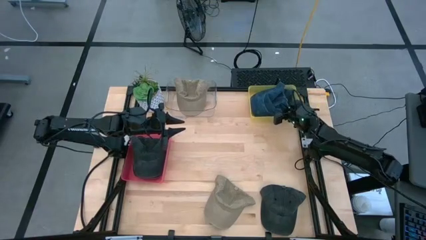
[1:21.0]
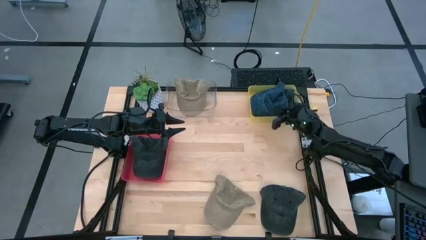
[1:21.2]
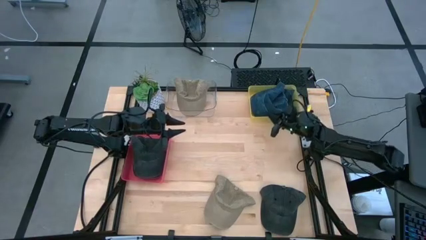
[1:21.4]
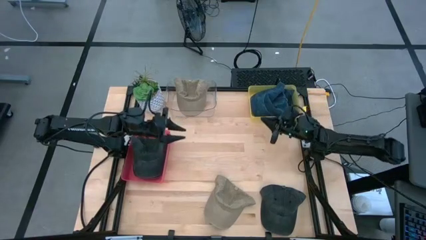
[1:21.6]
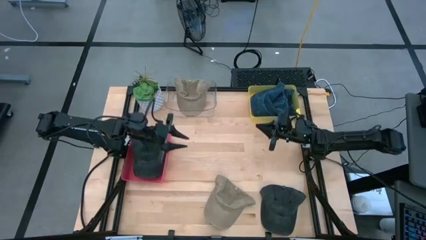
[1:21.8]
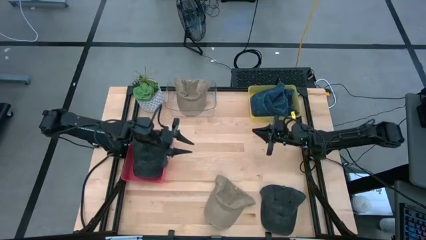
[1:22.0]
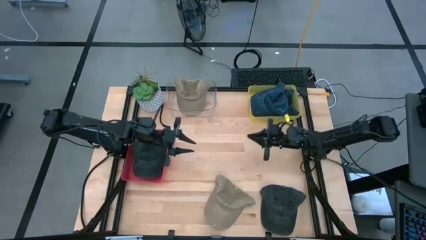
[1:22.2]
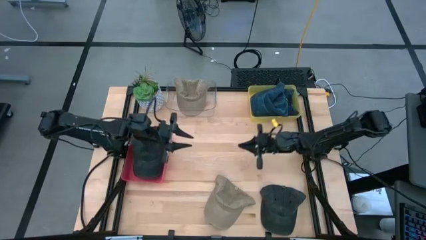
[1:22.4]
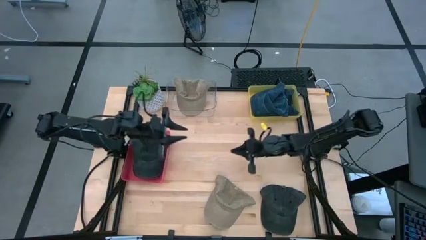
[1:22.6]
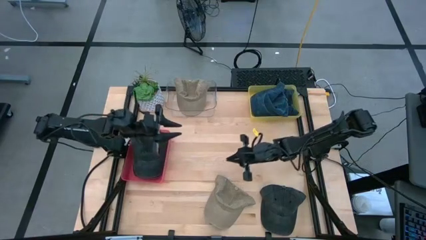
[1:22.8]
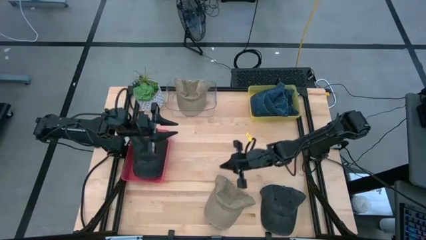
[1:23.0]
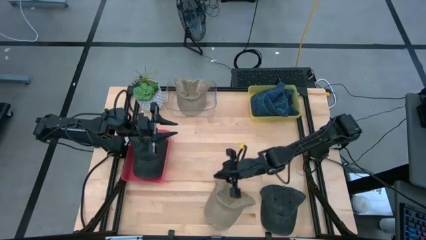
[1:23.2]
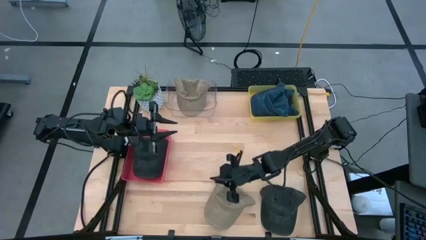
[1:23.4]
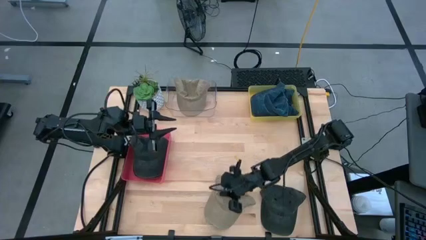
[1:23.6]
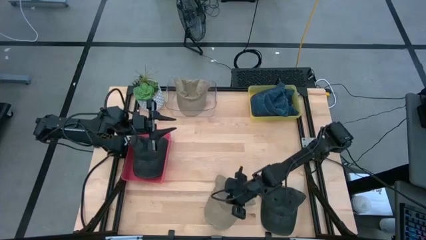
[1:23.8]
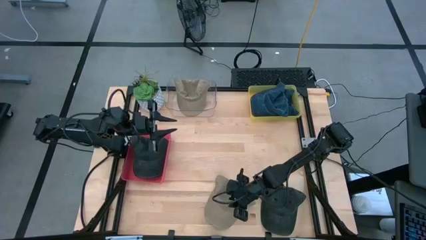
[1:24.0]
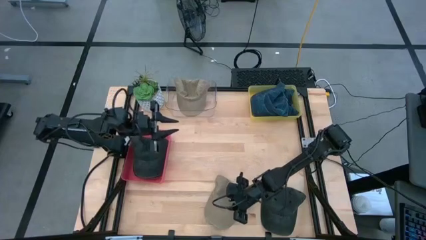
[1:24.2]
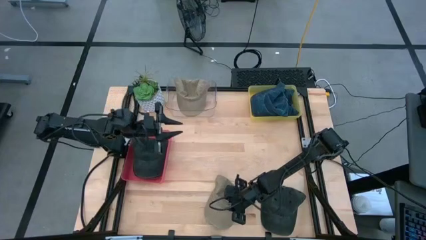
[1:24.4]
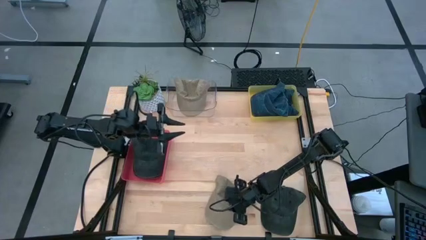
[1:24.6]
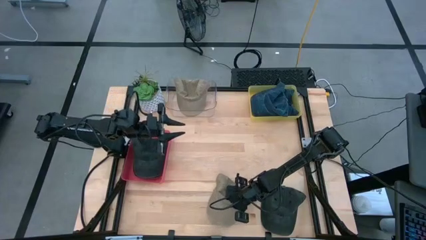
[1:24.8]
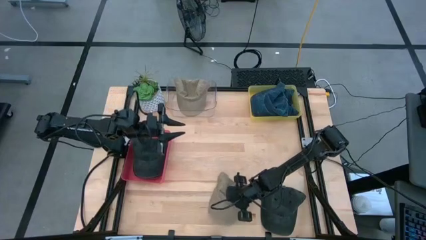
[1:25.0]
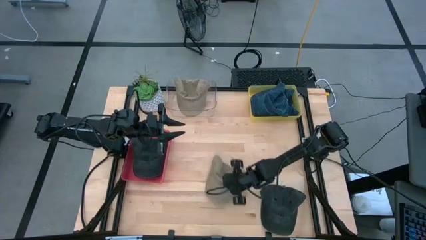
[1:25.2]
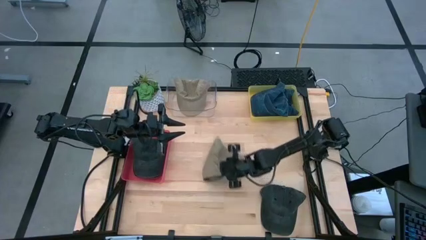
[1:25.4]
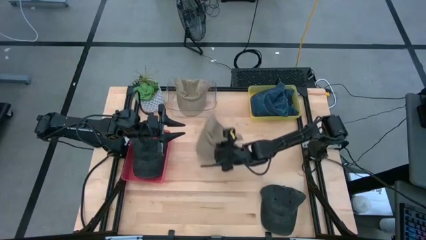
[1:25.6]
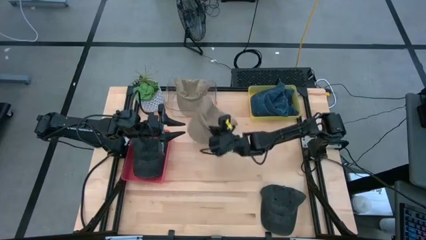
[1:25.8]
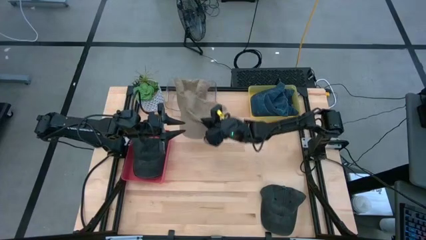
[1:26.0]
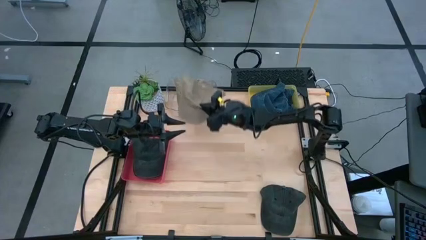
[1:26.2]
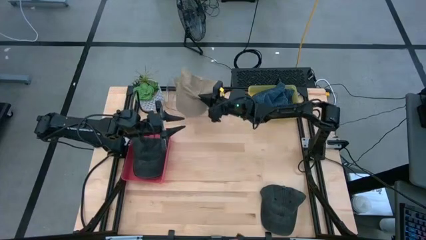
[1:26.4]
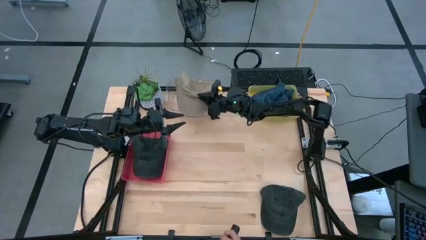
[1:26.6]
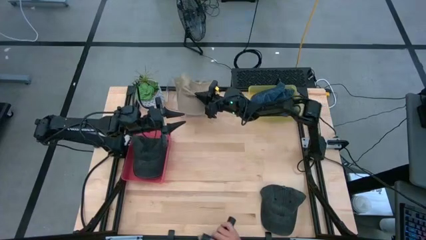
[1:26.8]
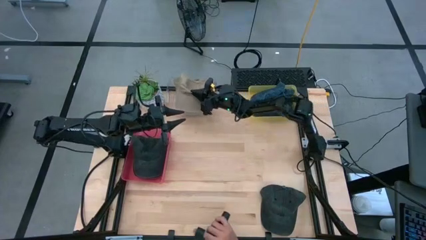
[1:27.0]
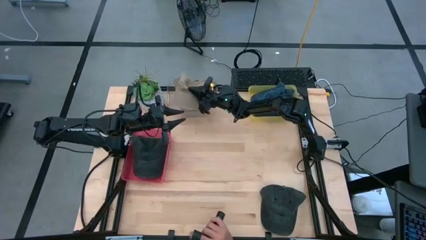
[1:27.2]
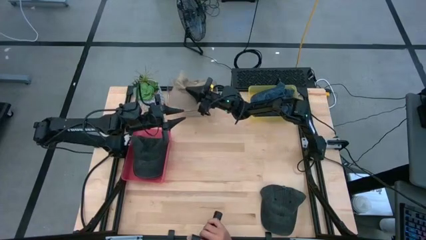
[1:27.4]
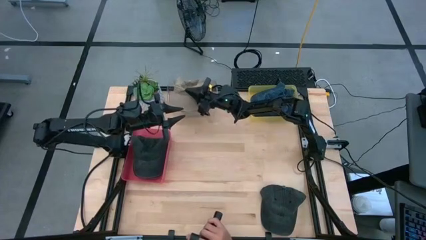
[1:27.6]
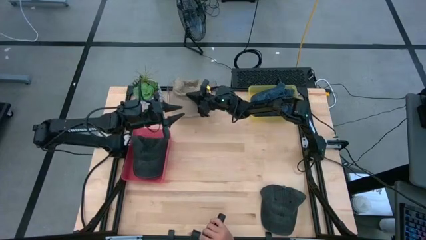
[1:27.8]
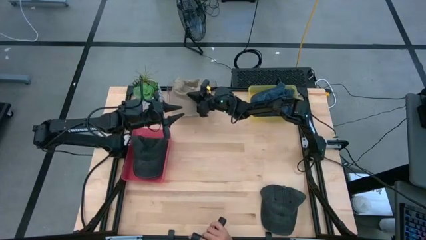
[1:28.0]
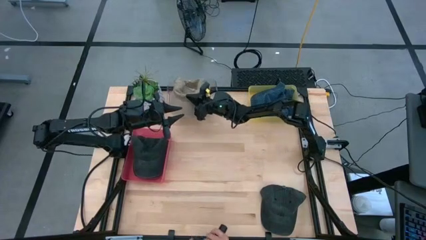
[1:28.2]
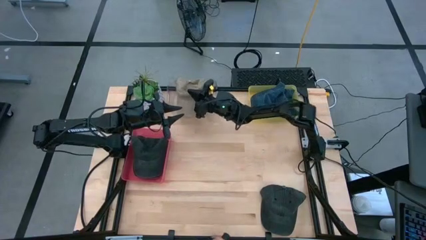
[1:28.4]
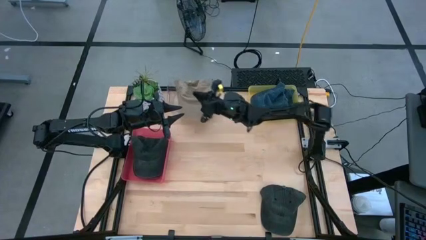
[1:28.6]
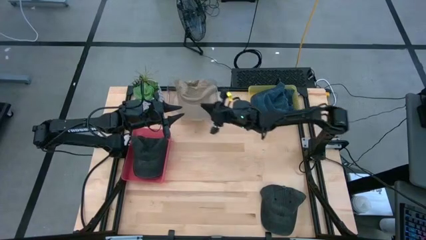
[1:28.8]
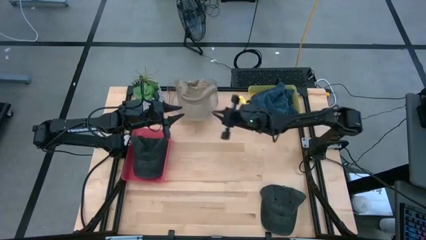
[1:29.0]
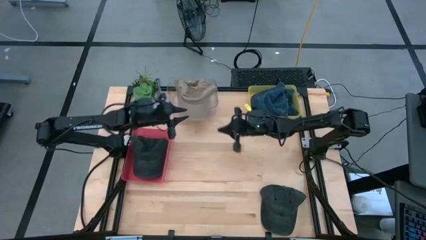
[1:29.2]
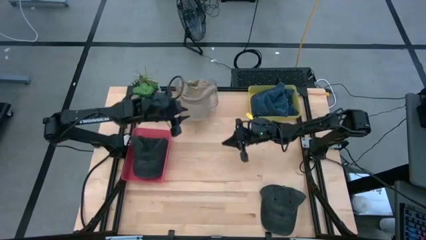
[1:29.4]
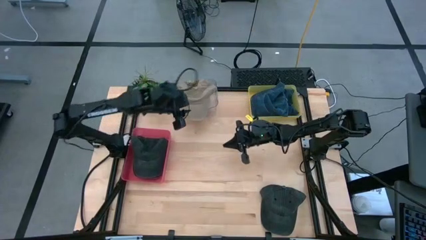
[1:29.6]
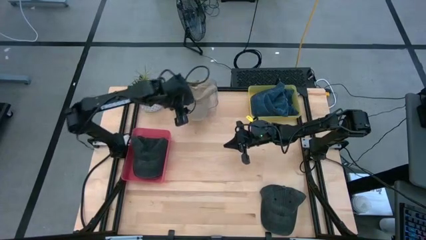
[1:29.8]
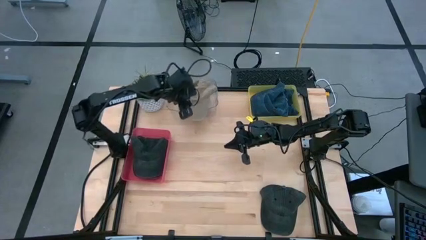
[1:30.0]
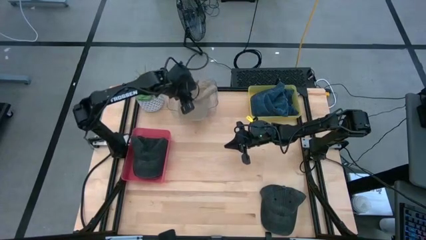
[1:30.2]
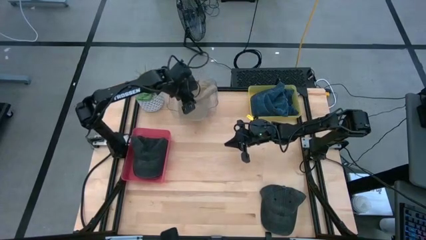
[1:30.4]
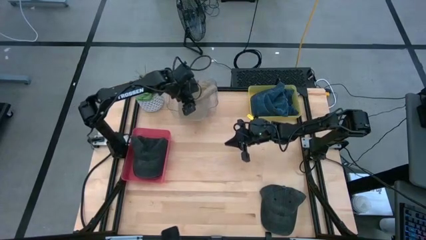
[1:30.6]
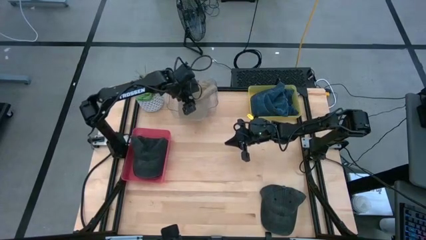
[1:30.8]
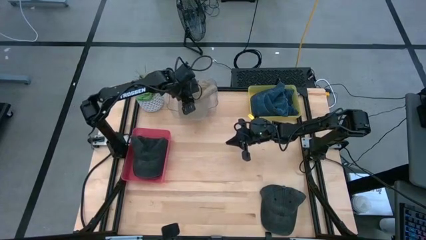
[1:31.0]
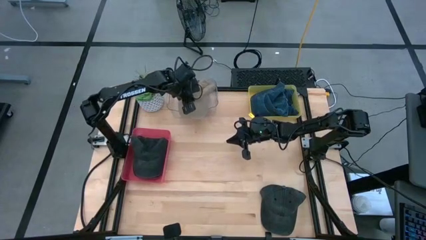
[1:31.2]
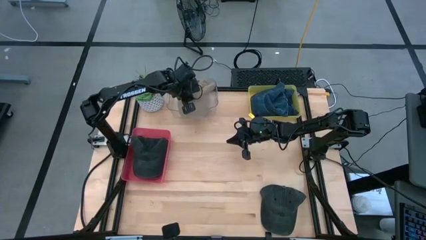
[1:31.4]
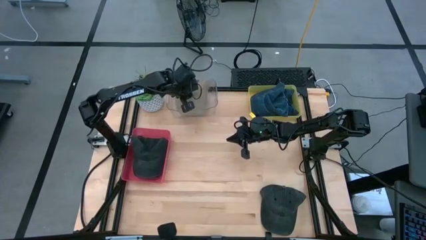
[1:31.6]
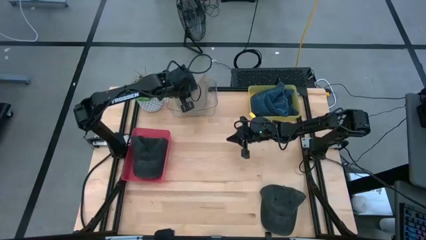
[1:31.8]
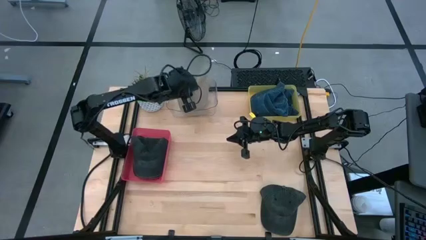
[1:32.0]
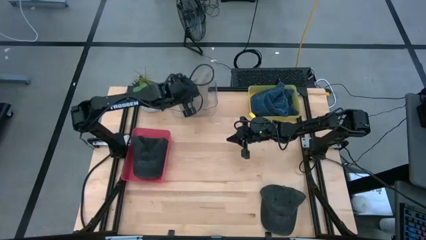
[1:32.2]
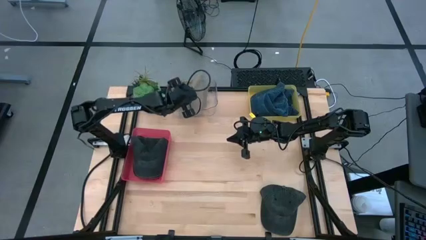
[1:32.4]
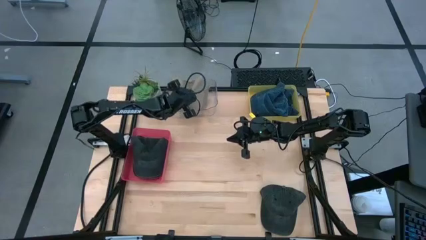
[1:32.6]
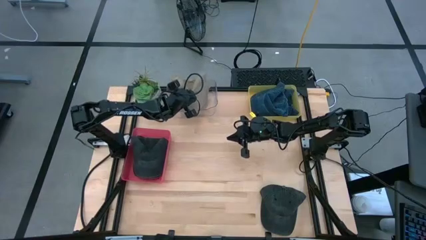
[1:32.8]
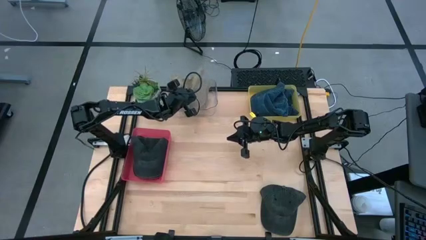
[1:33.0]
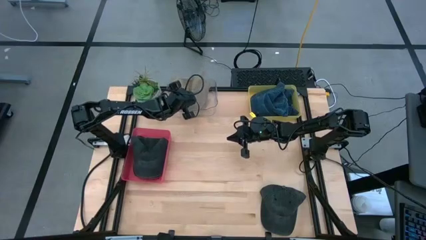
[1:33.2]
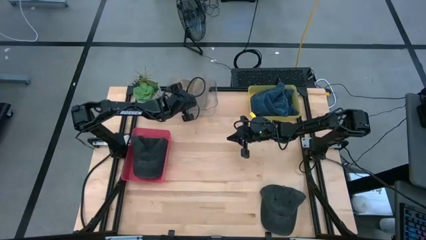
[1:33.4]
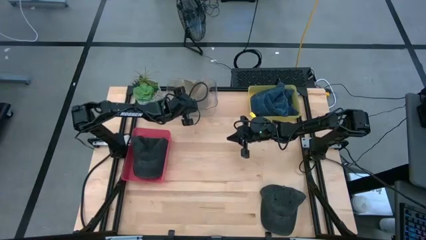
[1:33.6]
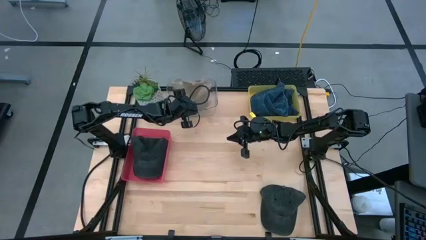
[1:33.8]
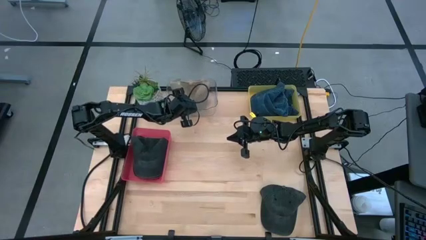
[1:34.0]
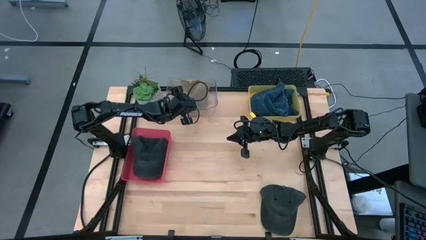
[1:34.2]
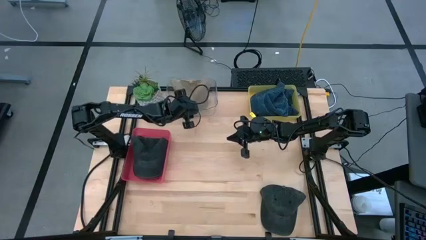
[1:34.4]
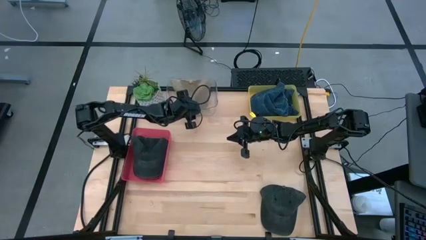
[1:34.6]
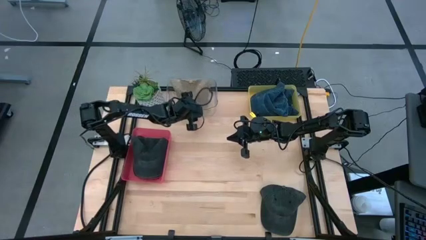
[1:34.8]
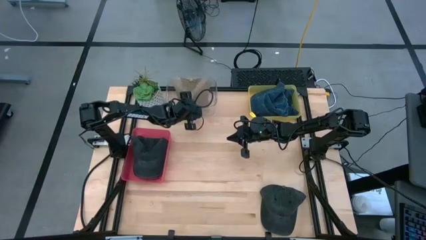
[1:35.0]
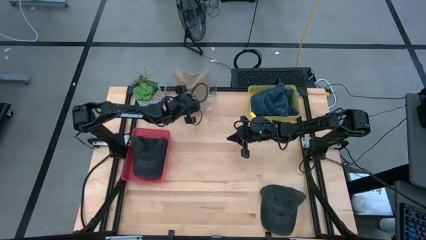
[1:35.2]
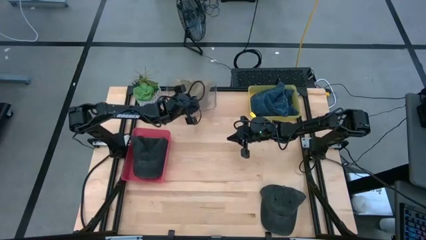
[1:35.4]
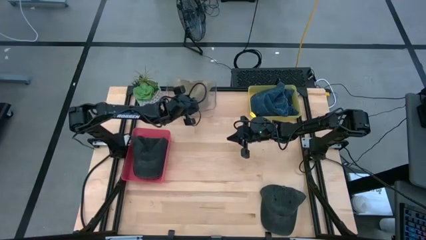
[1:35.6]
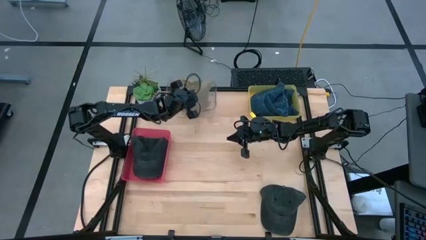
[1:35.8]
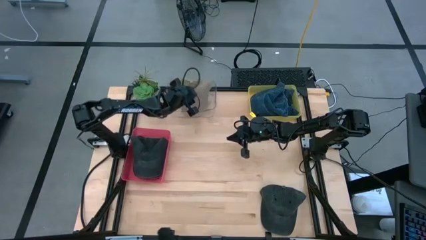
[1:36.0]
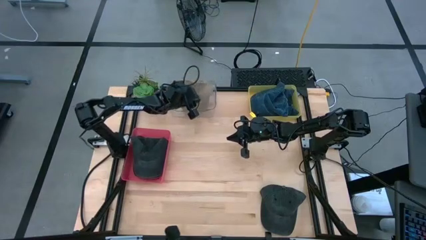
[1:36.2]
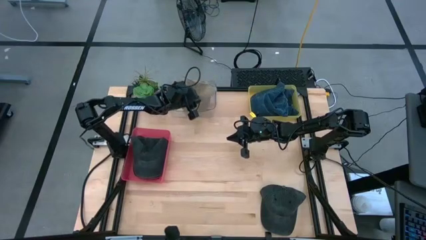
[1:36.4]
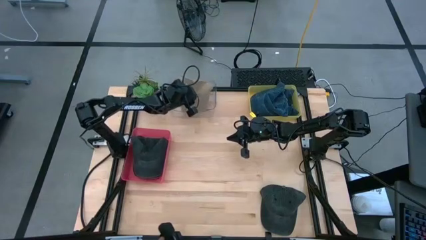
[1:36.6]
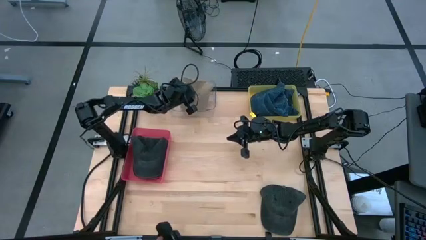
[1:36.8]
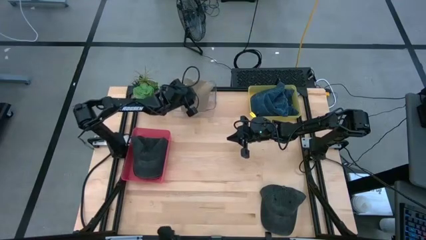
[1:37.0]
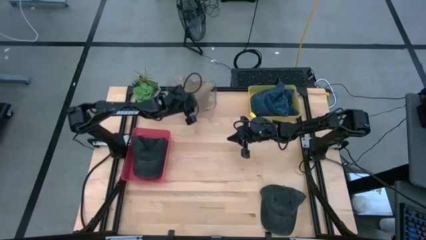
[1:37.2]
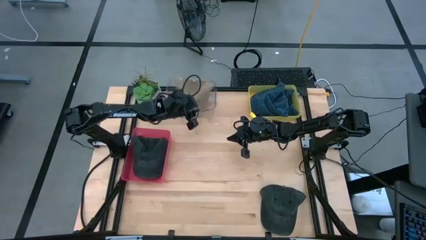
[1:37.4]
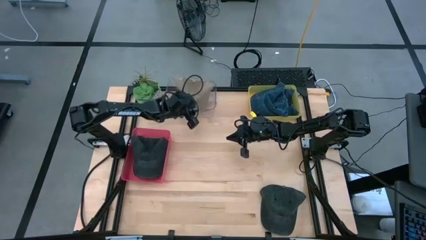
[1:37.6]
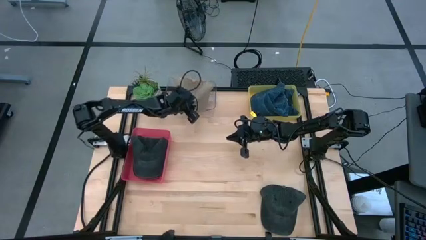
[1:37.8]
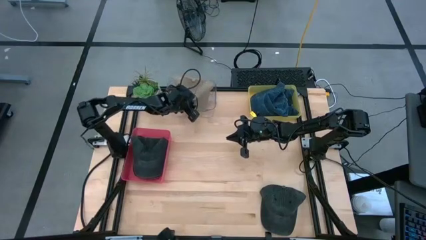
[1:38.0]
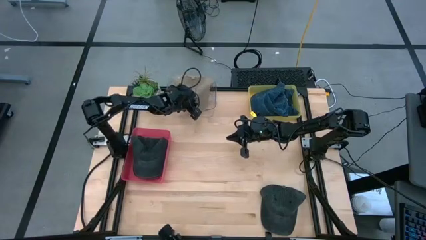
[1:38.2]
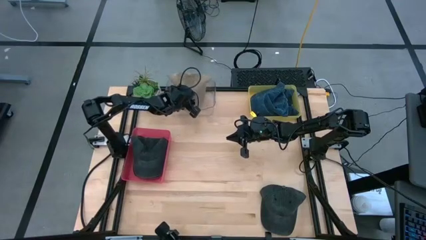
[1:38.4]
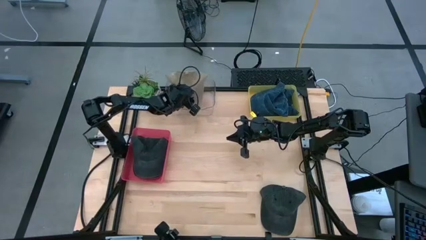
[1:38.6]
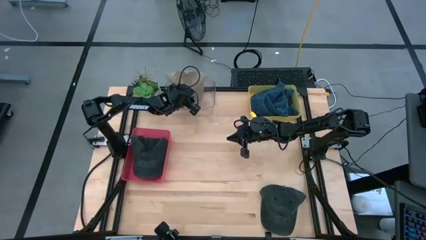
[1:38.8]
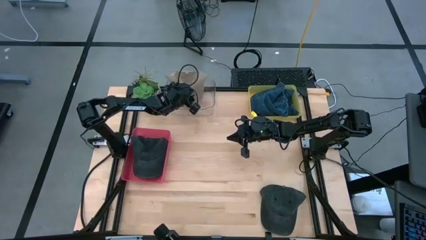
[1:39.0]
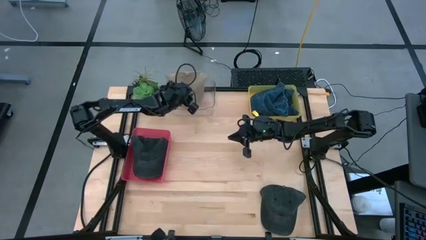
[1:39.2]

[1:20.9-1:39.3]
Task: Pick & Place hat
Put the brown cap into the transparent bin
